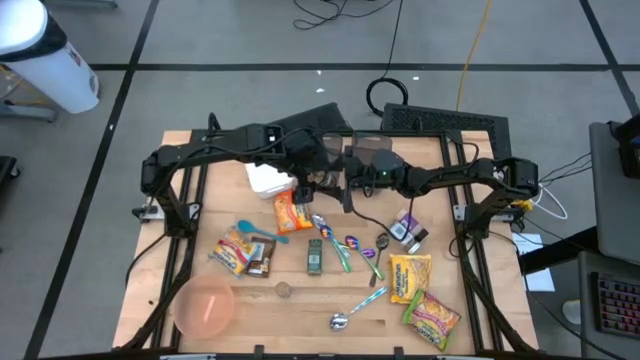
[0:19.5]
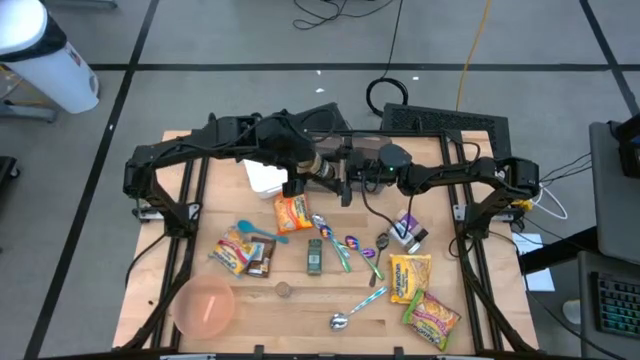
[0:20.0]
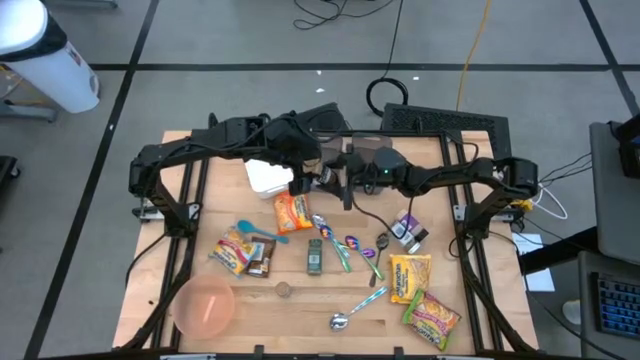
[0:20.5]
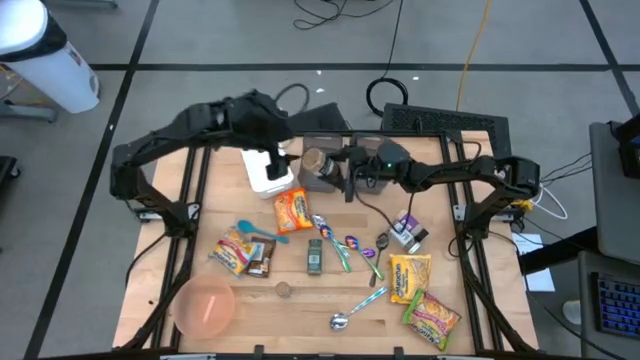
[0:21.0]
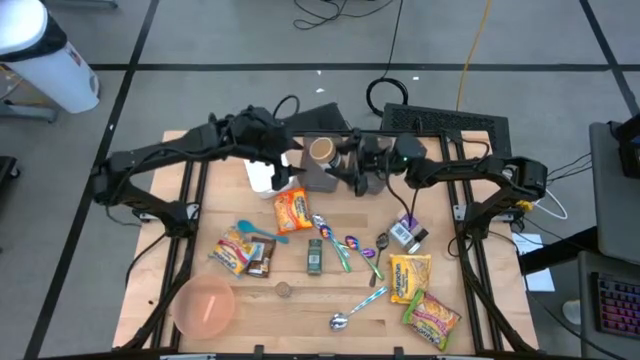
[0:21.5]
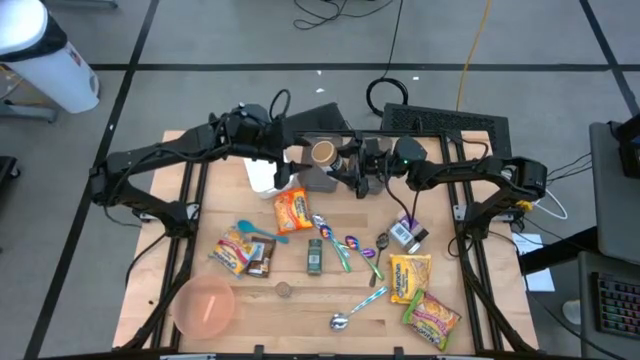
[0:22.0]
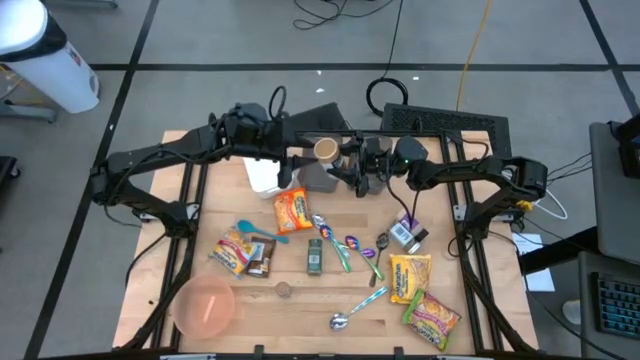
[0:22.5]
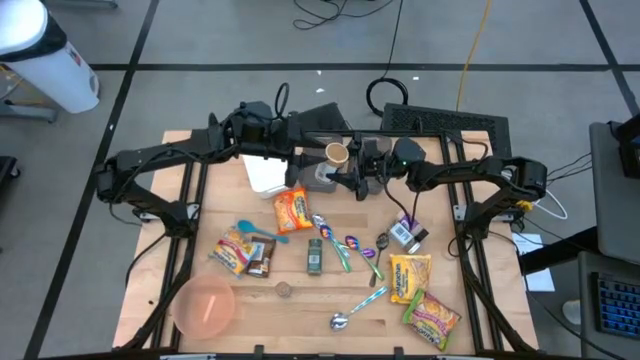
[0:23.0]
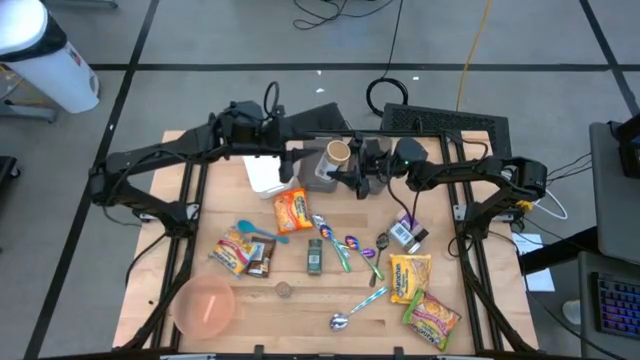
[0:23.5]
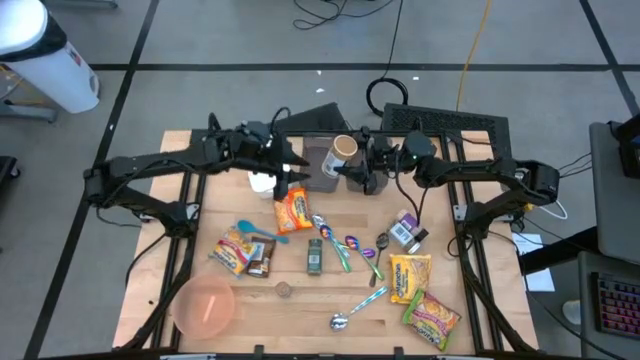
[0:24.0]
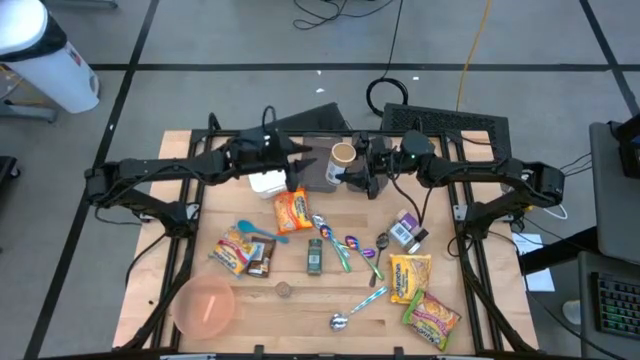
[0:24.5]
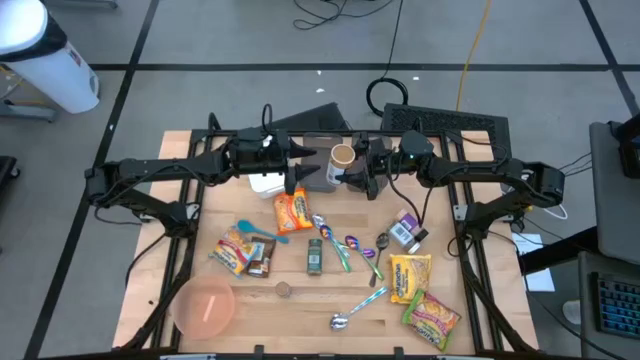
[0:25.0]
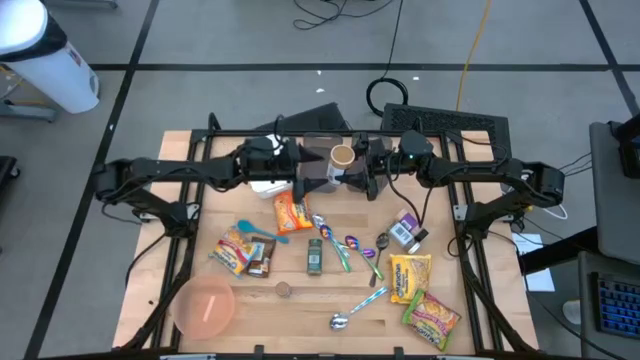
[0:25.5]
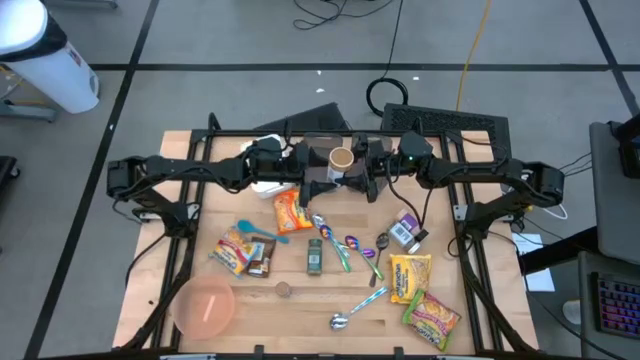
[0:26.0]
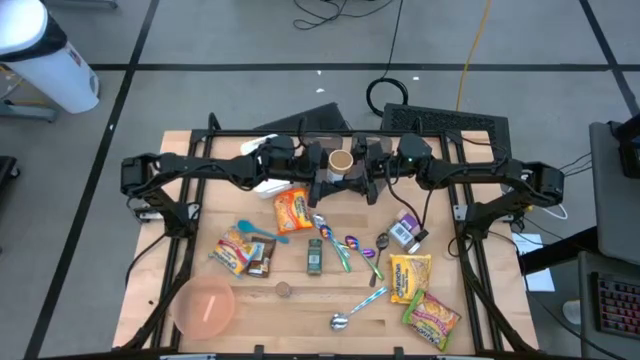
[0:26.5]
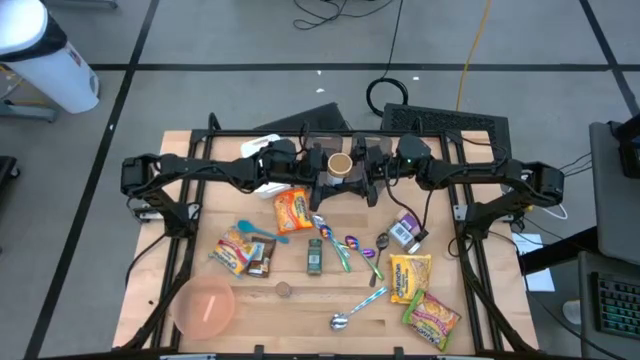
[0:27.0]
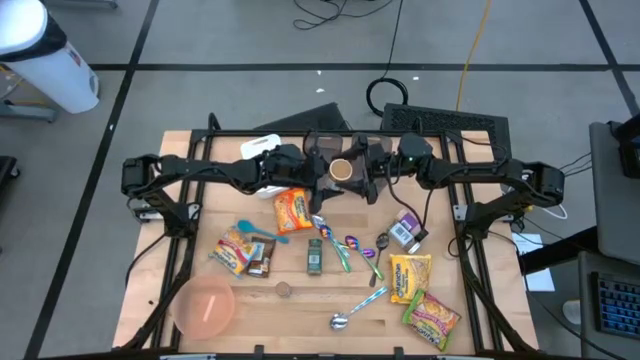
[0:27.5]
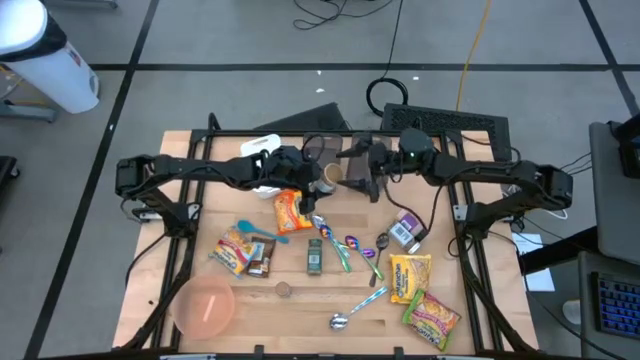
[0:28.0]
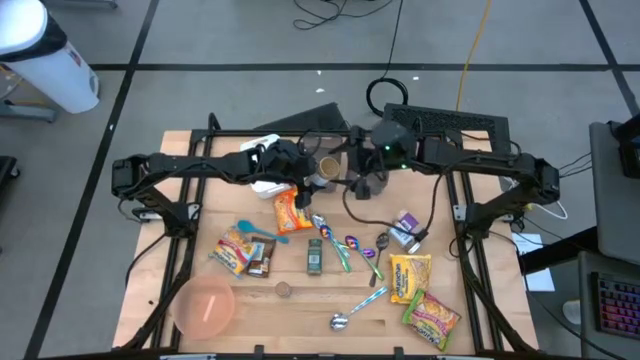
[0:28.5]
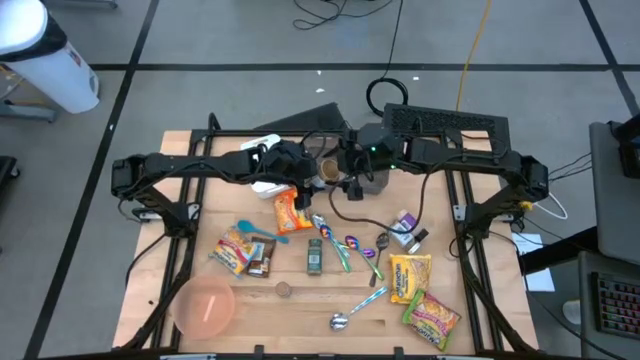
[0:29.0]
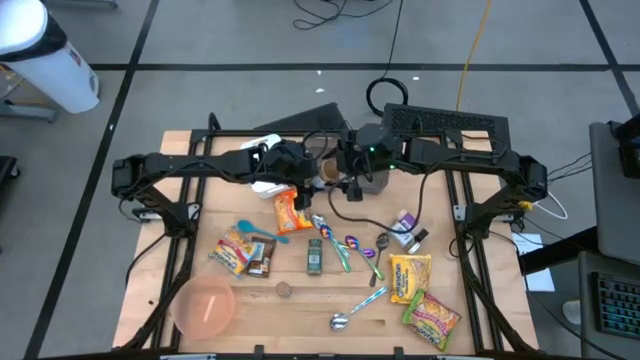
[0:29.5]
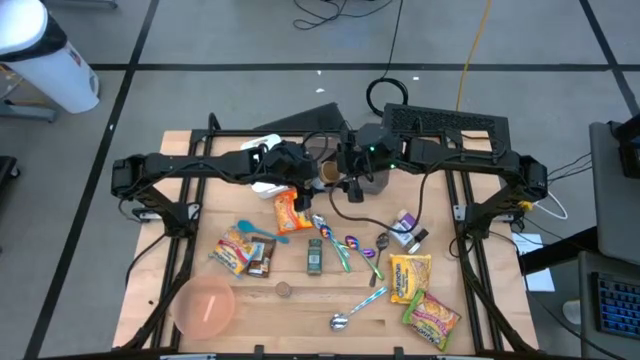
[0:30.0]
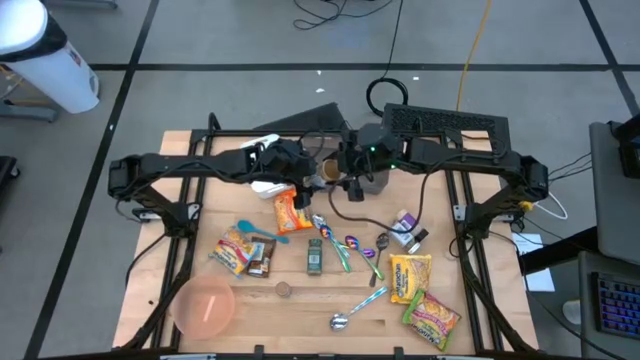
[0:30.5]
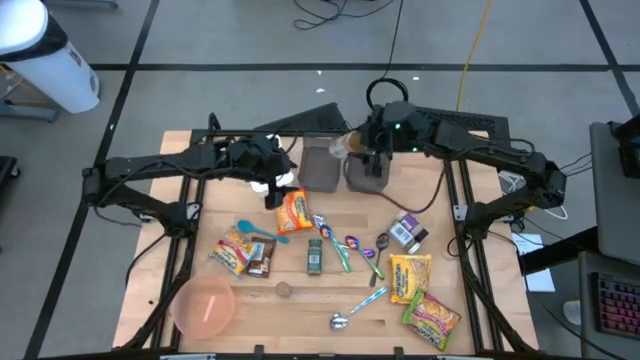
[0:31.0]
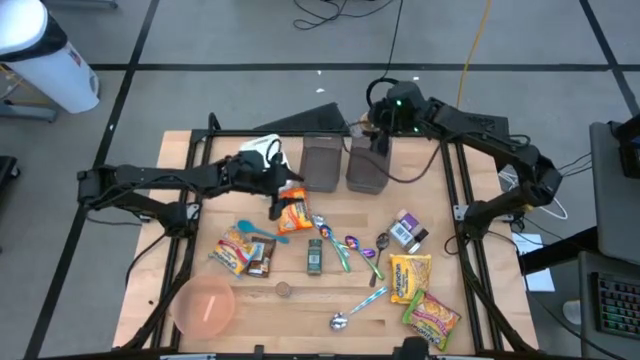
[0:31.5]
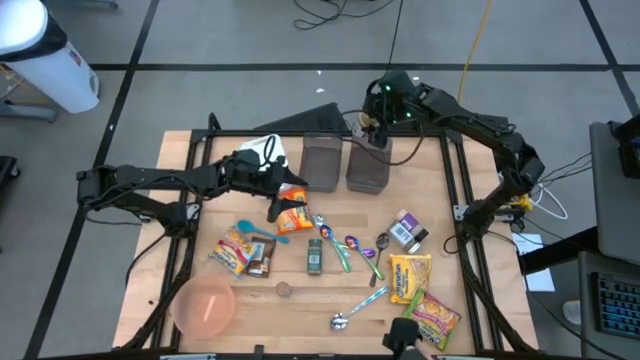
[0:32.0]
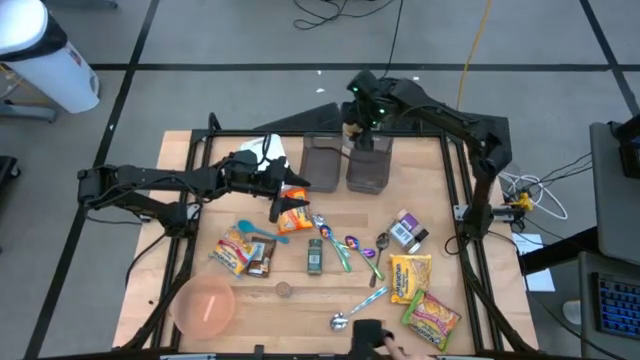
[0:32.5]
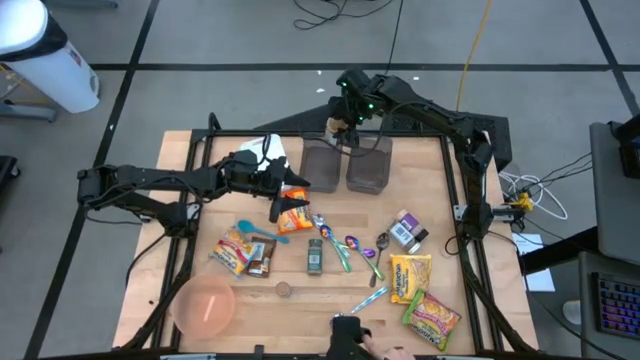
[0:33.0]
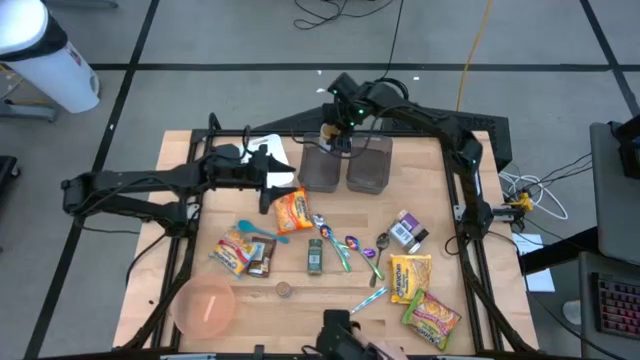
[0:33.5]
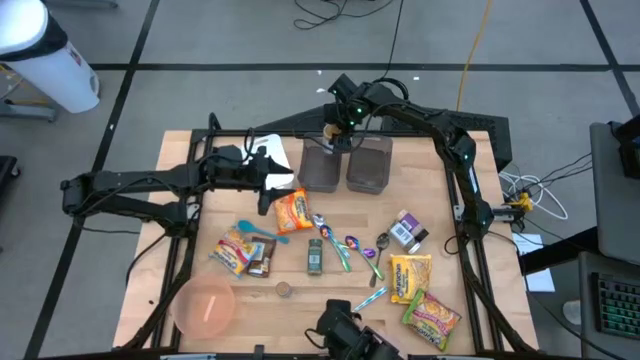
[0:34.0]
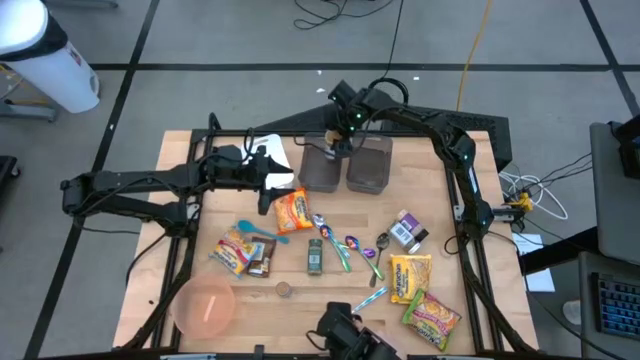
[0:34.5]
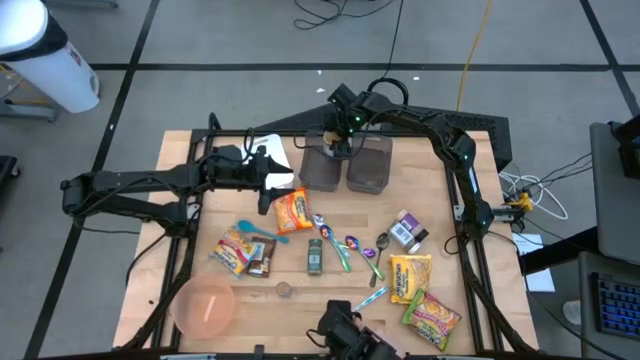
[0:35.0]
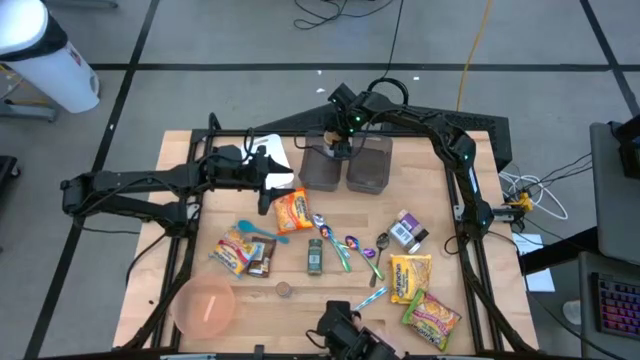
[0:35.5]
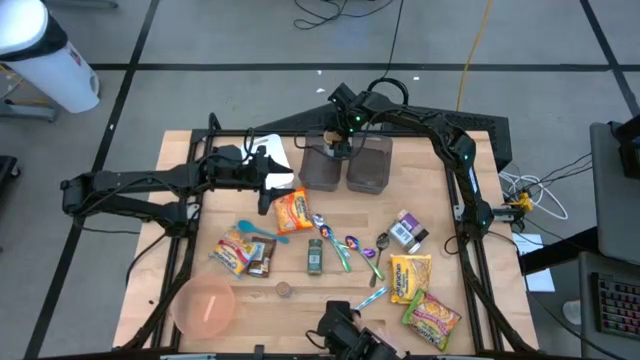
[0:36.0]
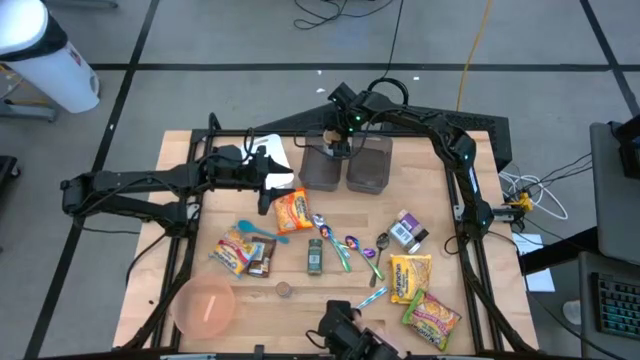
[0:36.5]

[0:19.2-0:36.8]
Task: Pick & Place Food Item
Put the gold seasoning bottle into the left black bin

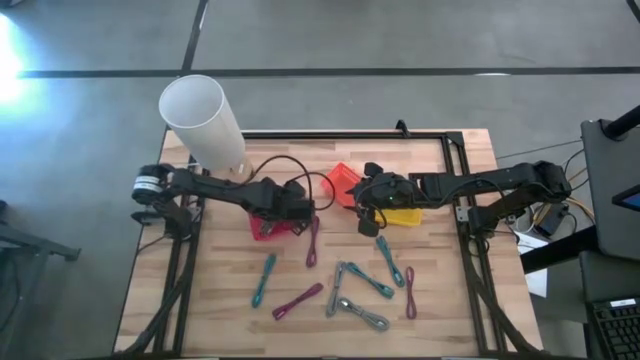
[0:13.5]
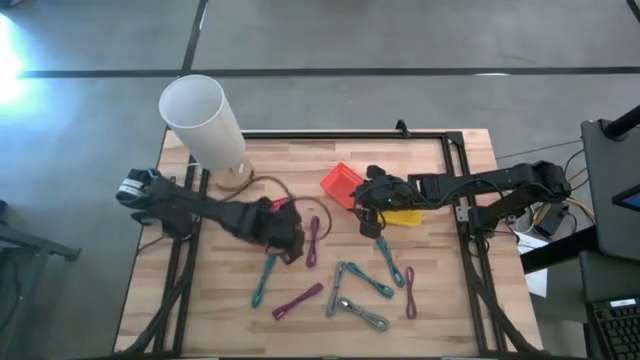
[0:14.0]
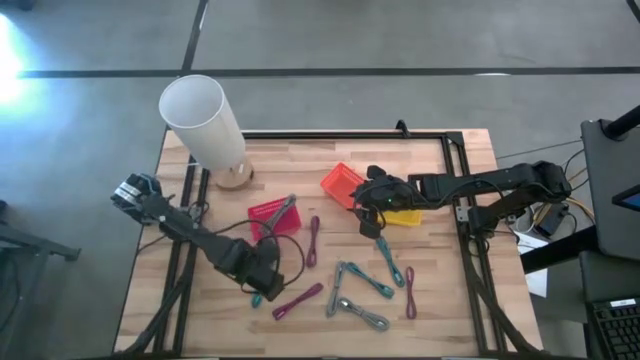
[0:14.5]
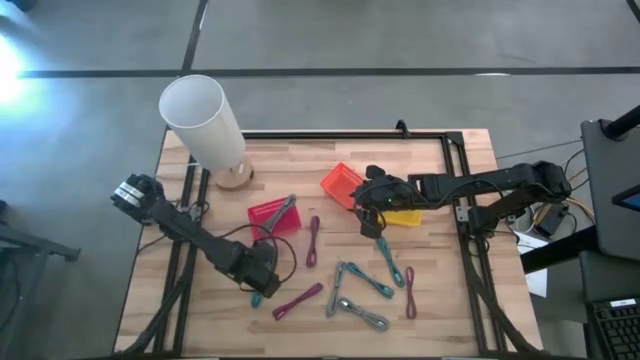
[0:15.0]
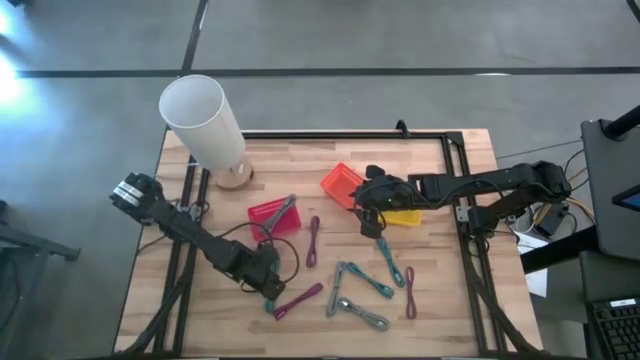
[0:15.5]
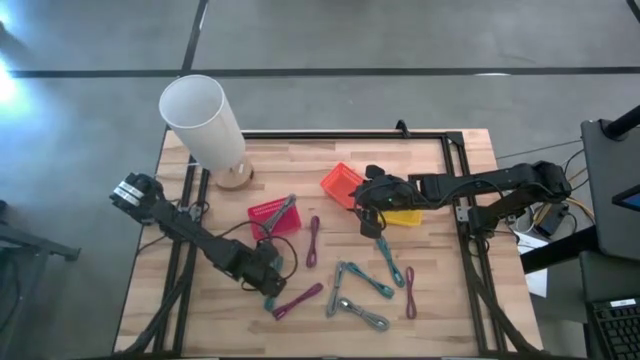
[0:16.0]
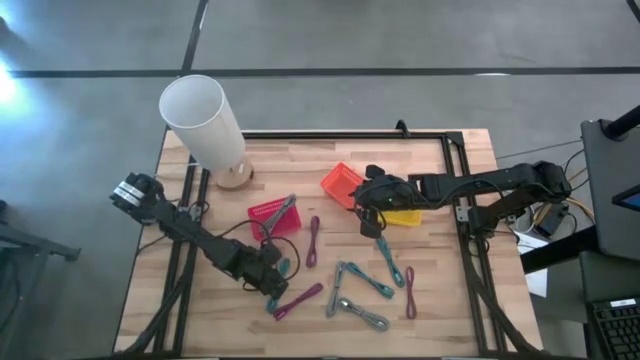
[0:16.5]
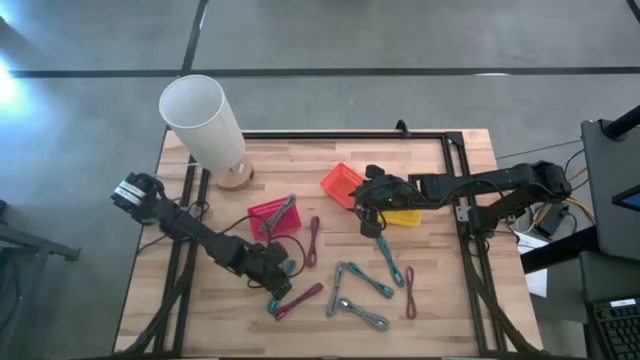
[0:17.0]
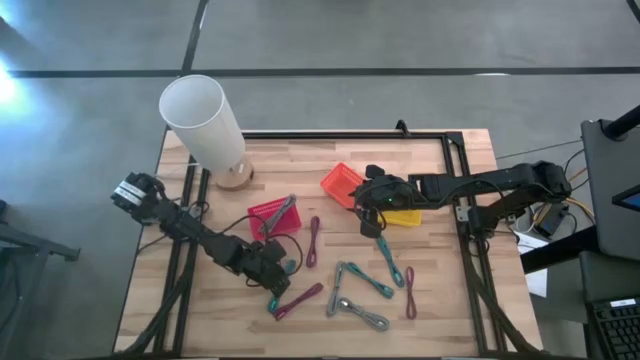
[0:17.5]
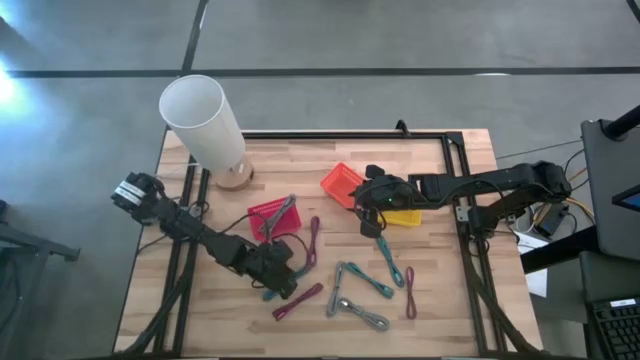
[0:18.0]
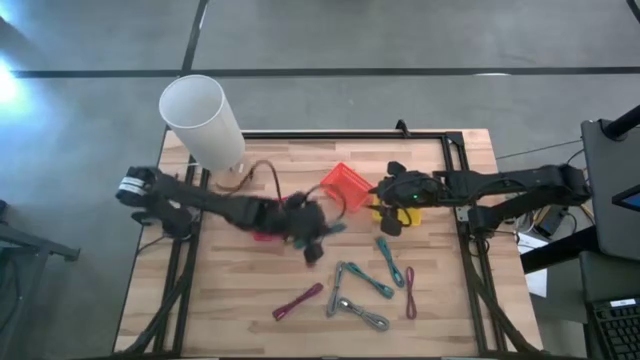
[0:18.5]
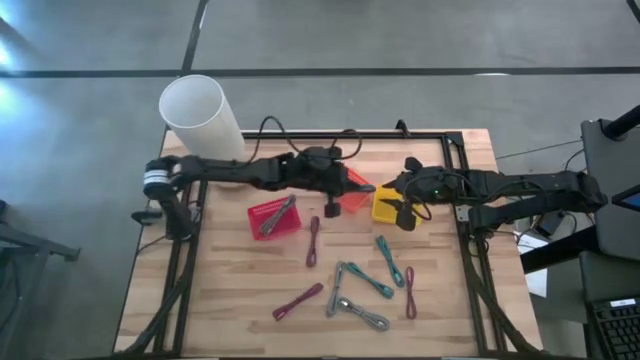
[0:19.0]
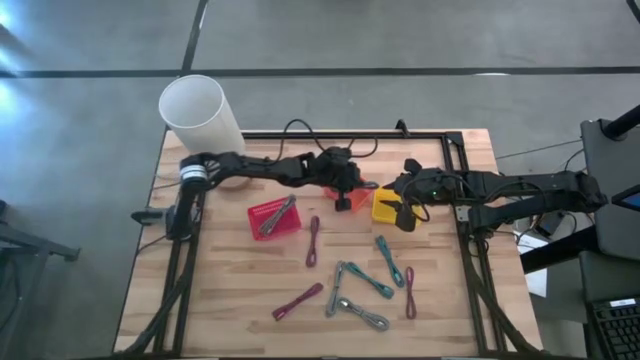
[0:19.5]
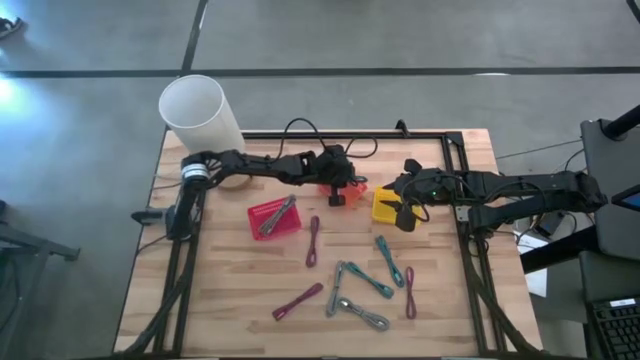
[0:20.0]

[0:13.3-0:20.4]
Task: Pick & Place USB Port
Put the bottom left black and blue charger cable into the orange bin
